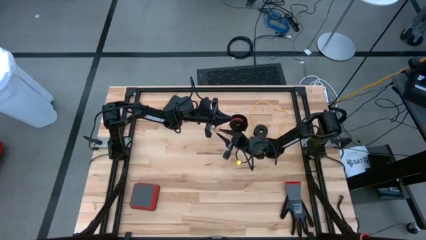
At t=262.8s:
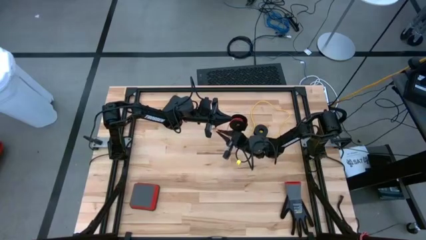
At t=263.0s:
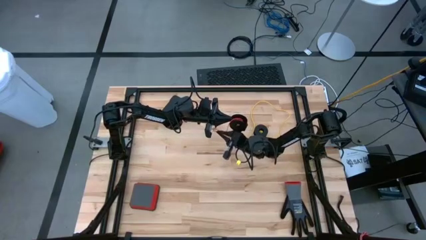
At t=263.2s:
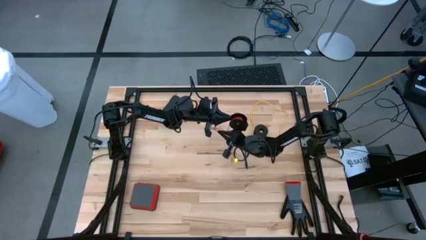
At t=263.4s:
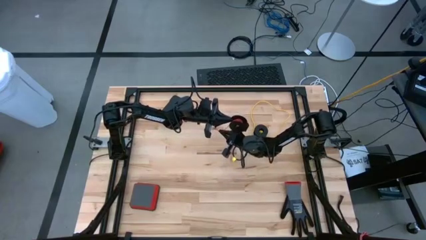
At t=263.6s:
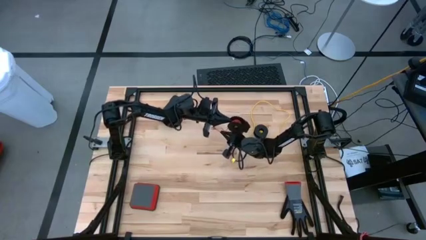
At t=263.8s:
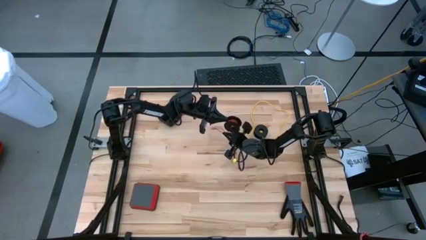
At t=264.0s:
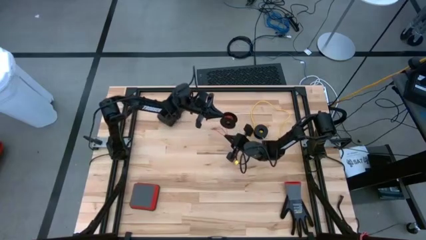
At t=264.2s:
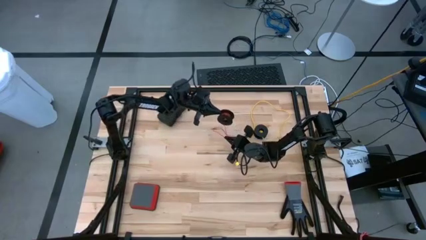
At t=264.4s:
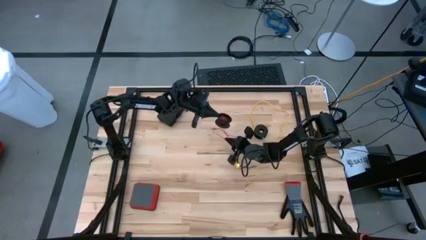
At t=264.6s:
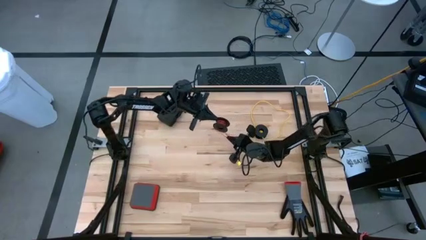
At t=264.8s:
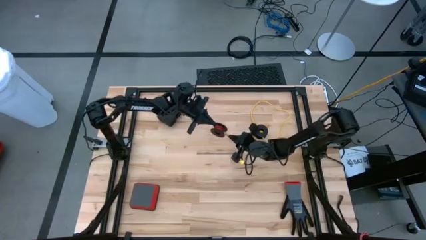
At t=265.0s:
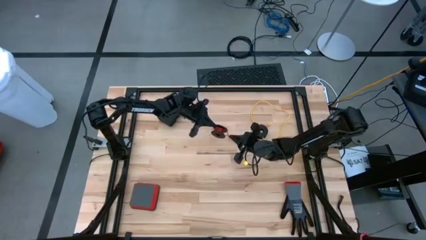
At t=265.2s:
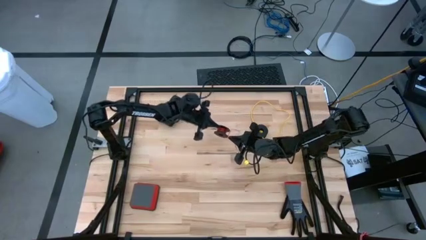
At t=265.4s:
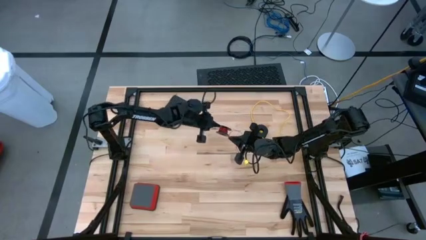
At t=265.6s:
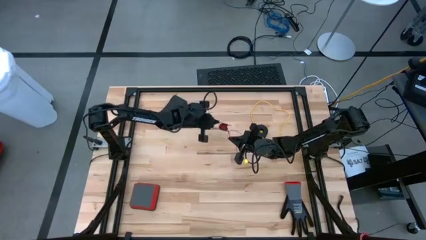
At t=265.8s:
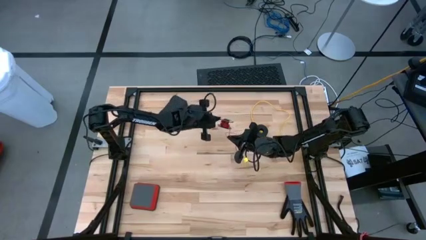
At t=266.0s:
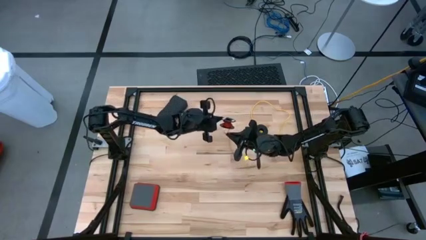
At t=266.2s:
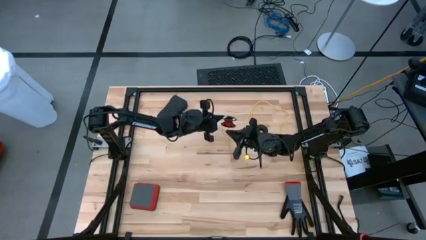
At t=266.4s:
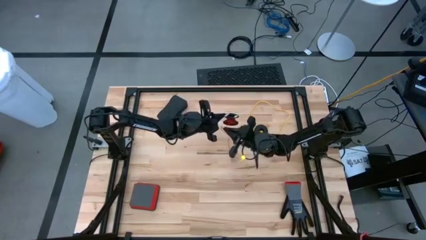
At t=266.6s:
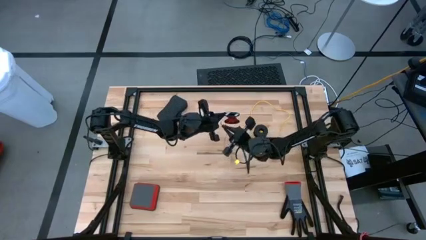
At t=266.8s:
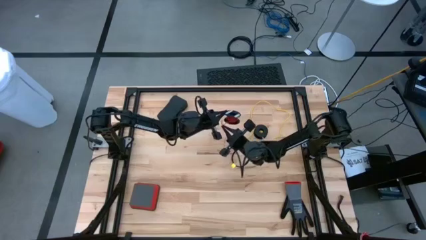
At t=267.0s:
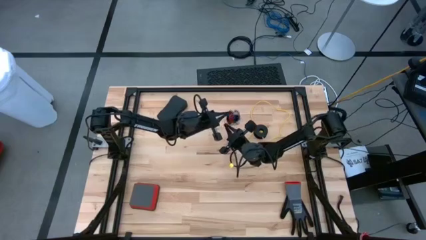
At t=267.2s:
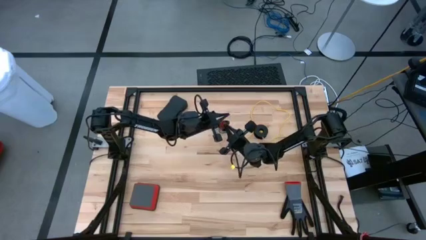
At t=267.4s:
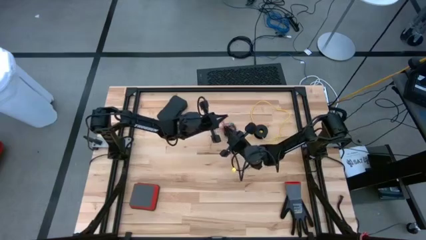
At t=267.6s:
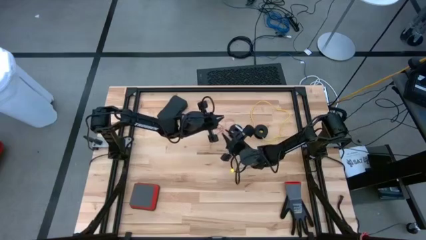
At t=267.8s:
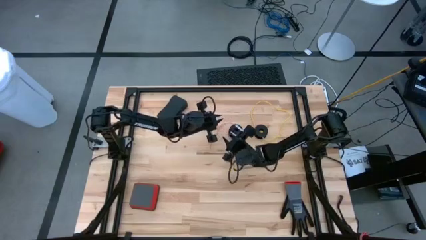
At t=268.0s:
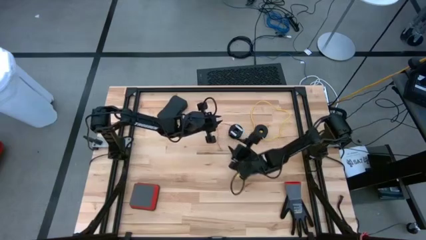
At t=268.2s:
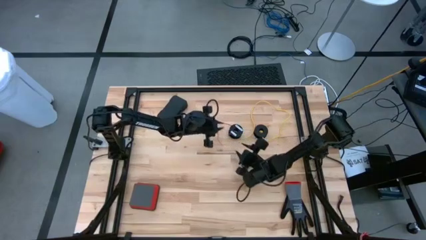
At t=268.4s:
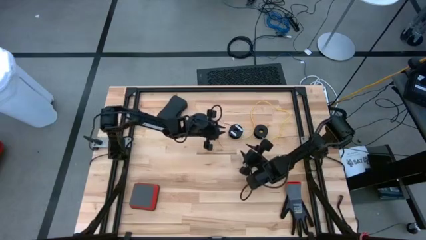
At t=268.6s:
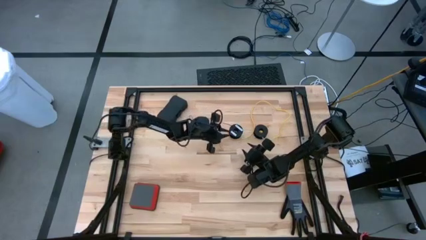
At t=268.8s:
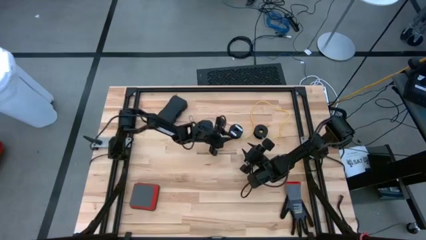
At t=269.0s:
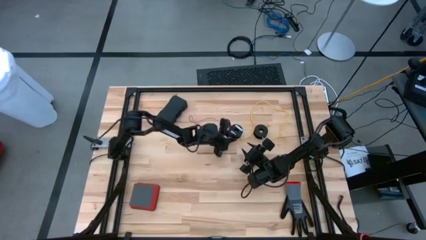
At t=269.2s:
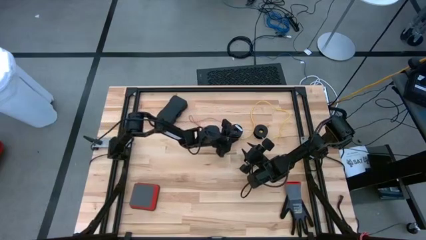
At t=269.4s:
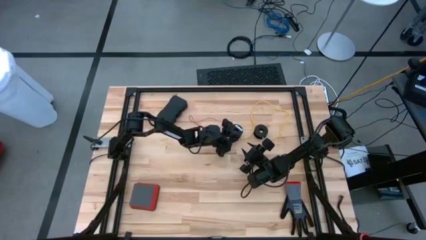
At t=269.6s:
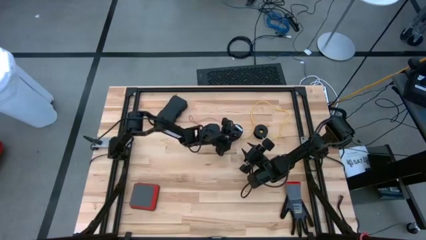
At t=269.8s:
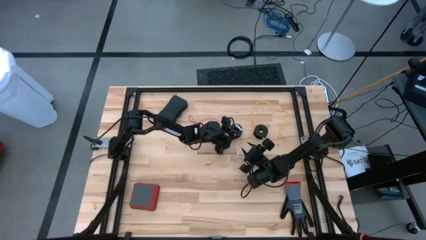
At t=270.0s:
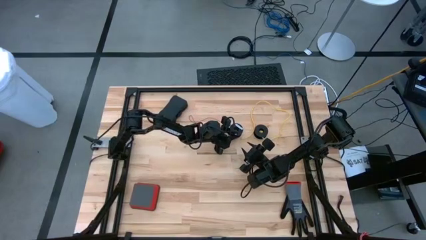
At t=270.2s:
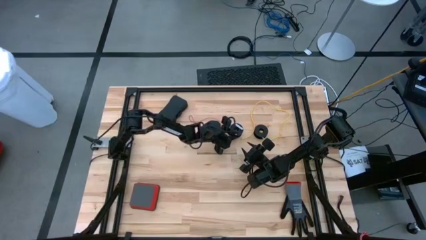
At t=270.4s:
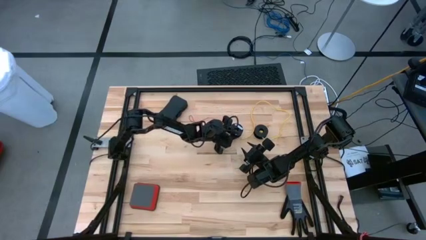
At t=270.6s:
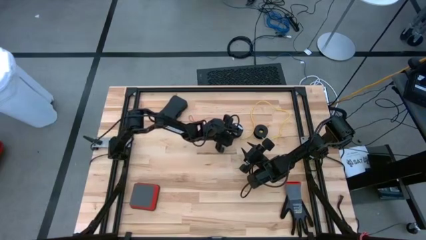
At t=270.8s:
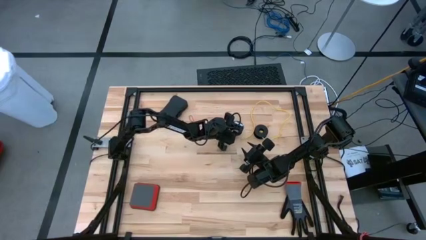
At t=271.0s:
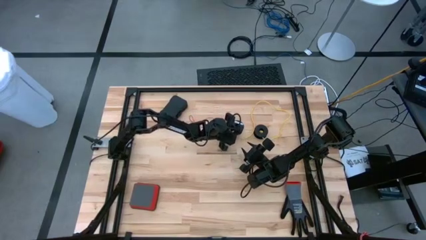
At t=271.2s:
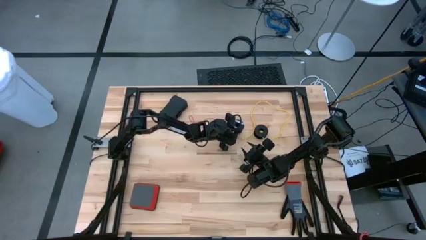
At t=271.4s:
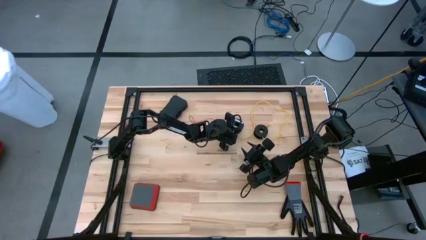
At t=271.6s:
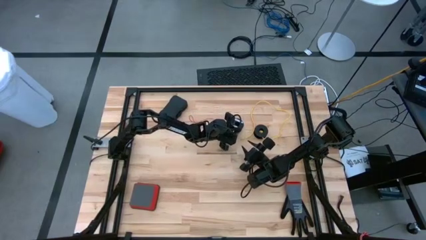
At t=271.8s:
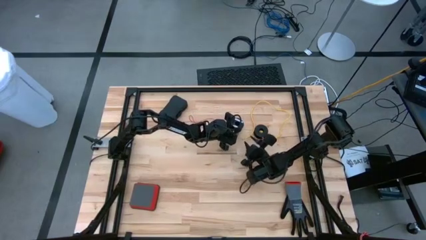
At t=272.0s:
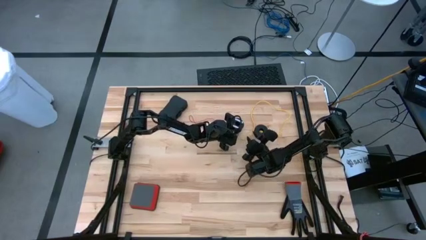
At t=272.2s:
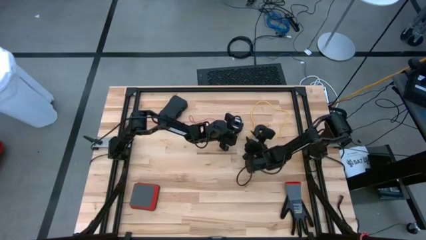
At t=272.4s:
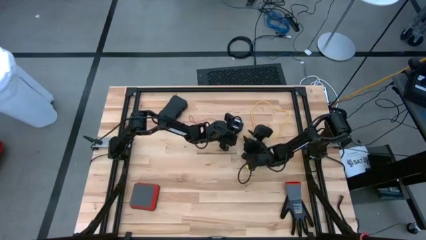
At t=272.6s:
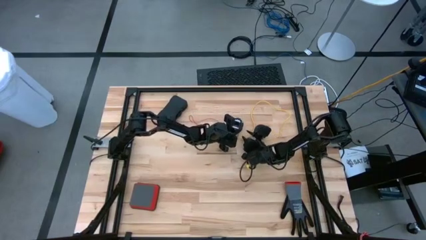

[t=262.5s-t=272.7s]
Task: Coil cords
Coil the red wire onto the black spool

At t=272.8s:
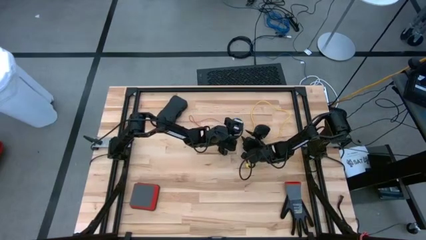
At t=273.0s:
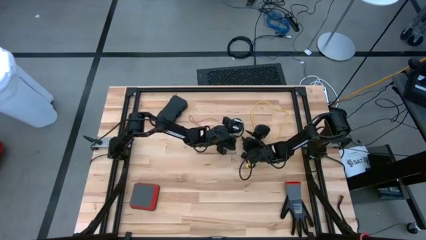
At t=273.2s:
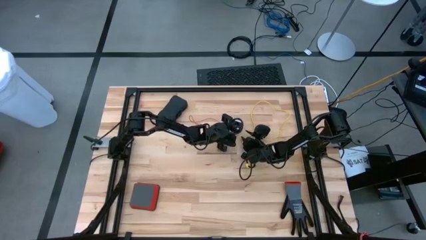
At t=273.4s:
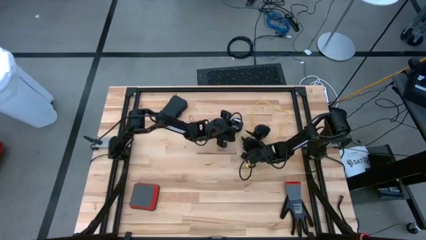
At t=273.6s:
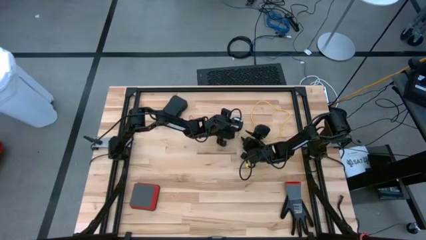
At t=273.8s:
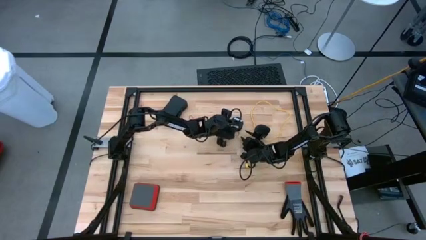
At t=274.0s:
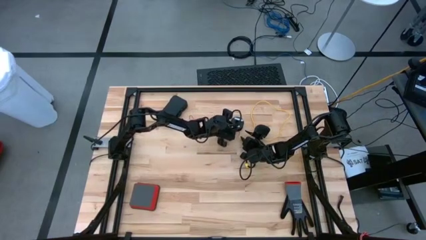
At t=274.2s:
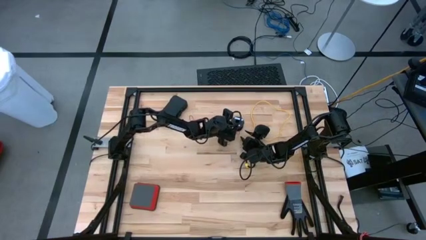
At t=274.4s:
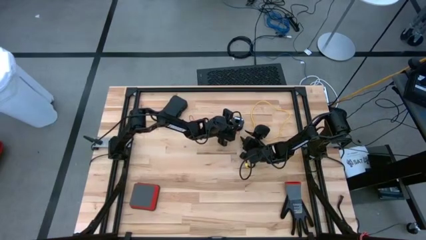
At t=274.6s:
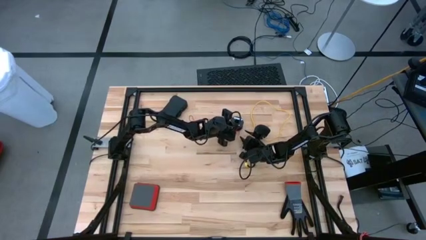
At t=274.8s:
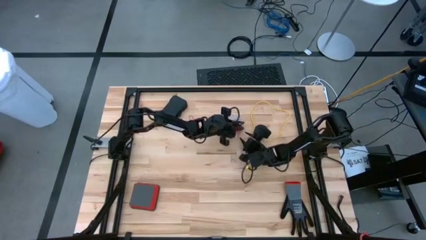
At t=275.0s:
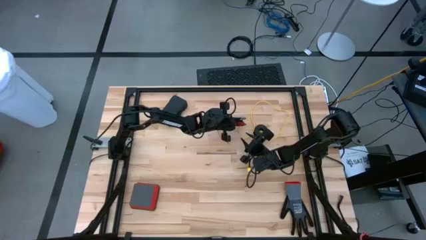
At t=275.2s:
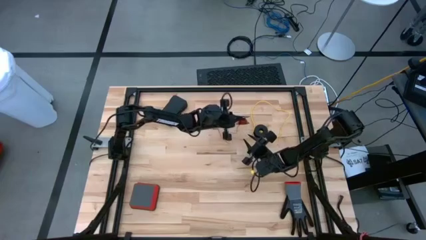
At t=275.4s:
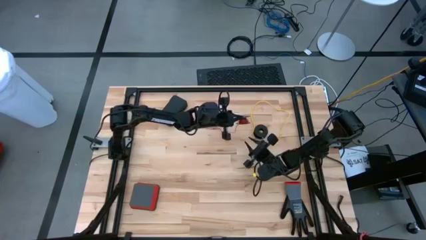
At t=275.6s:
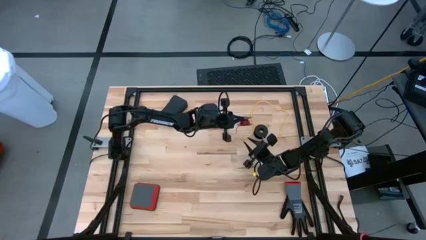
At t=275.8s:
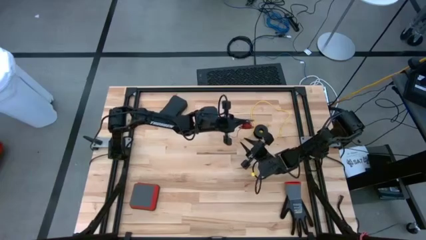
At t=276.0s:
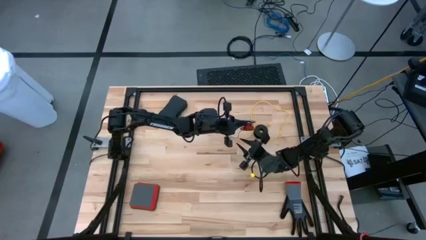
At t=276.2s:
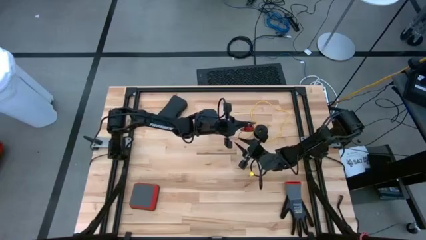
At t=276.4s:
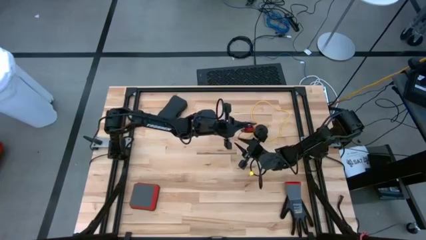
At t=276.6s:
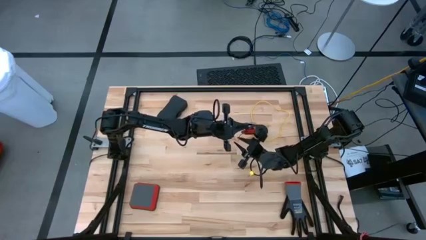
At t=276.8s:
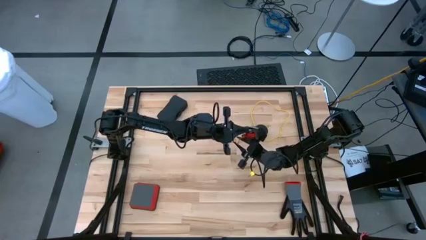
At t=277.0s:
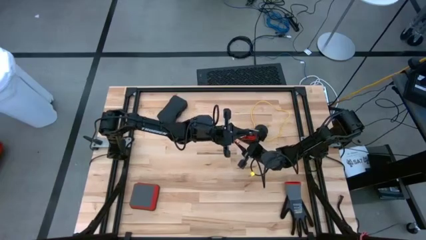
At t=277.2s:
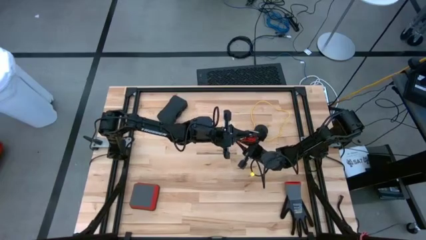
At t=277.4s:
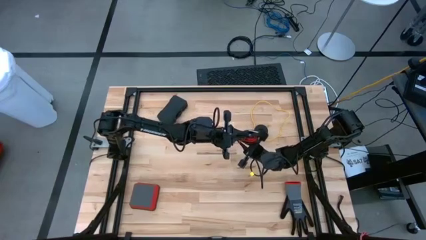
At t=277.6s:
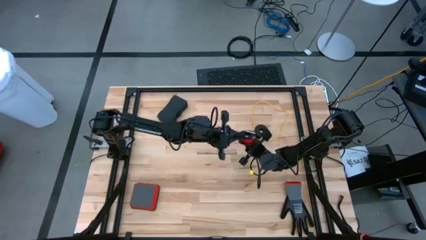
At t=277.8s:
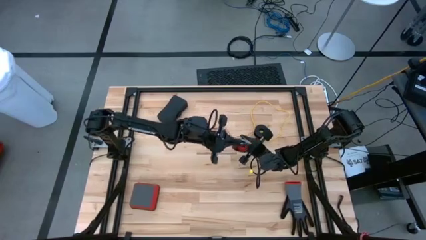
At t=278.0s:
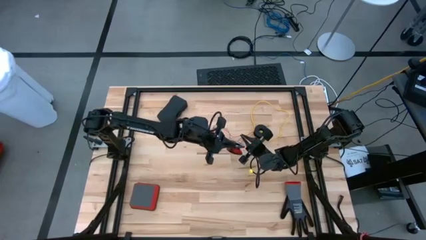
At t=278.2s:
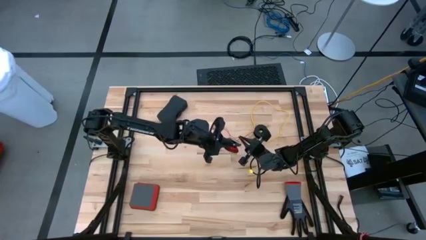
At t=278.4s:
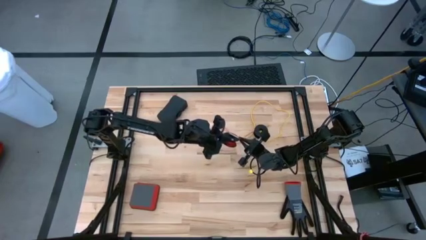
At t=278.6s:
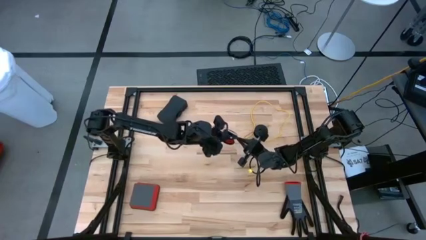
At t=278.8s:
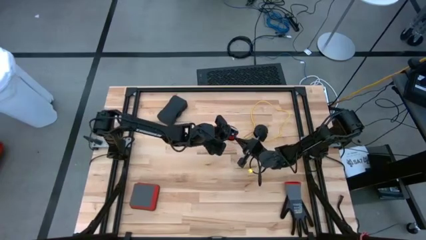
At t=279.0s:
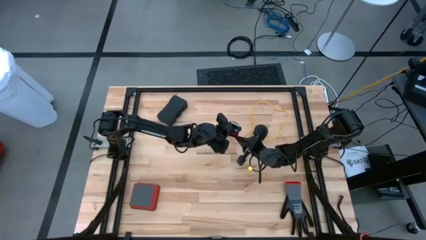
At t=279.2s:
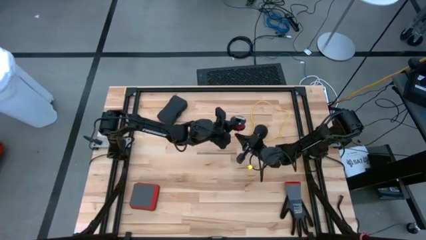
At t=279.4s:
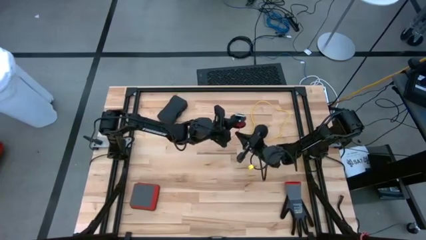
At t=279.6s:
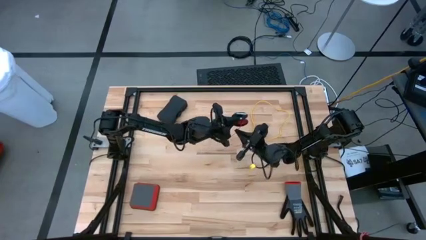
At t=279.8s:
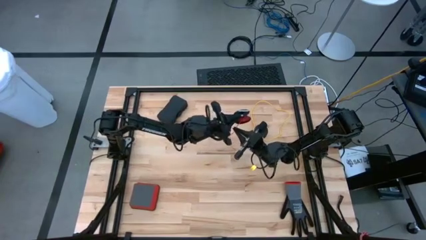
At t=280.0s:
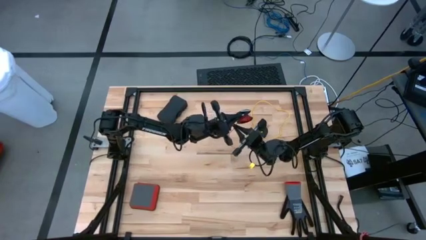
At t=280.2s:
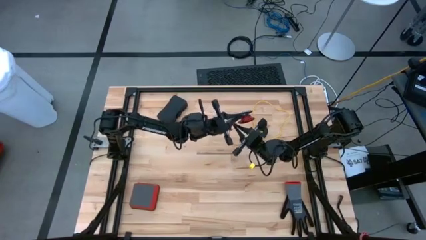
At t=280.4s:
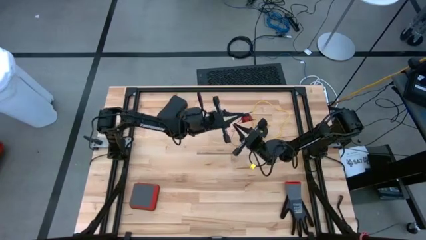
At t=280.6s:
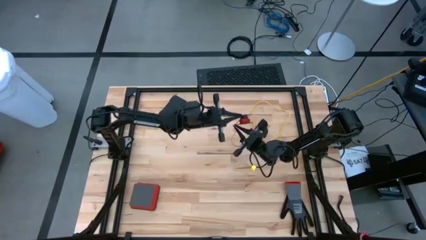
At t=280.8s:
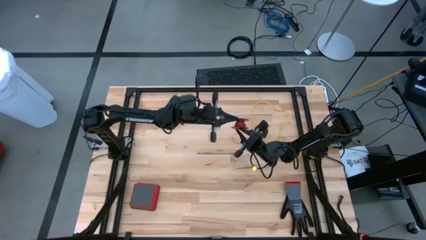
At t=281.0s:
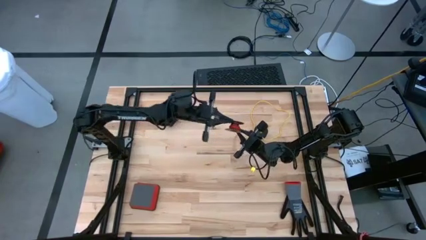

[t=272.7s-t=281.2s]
Coil the red wire onto the black spool
